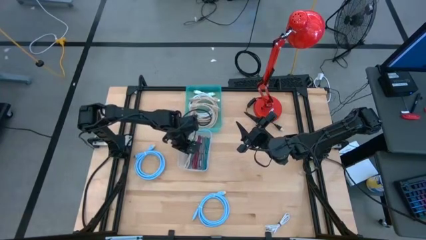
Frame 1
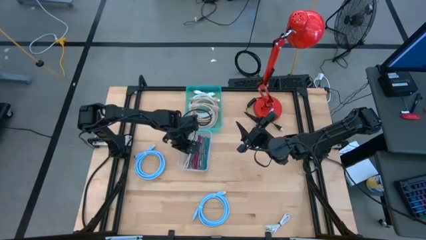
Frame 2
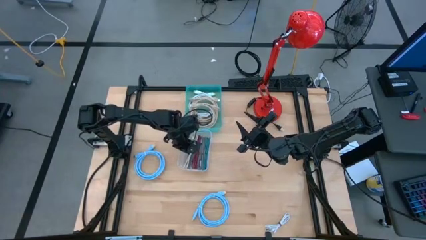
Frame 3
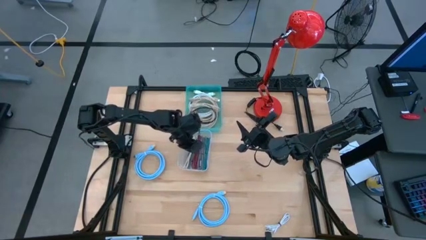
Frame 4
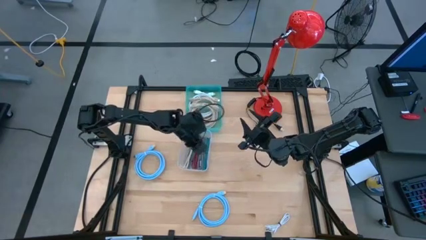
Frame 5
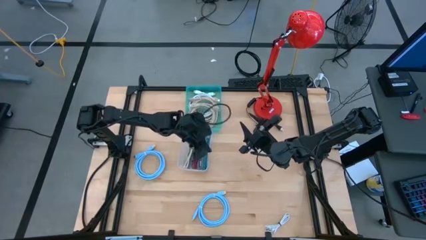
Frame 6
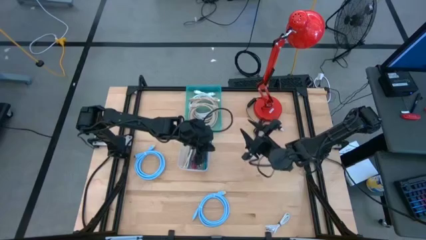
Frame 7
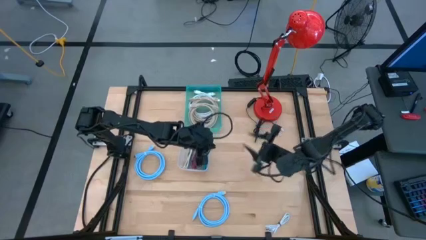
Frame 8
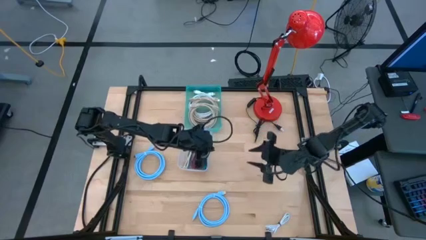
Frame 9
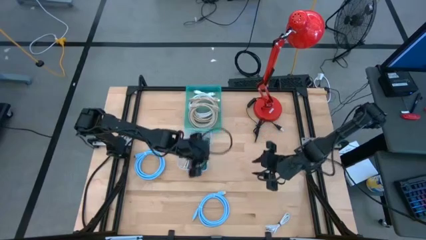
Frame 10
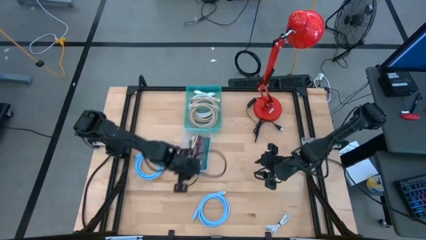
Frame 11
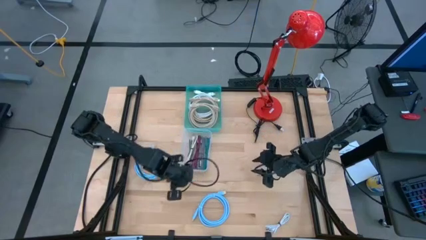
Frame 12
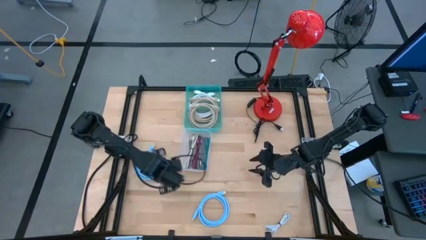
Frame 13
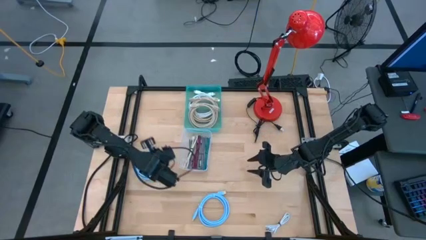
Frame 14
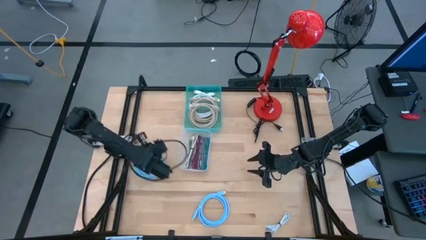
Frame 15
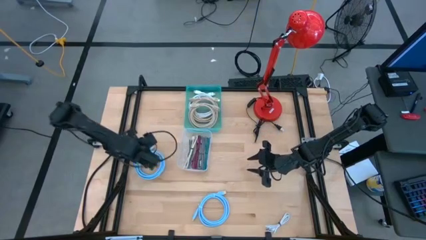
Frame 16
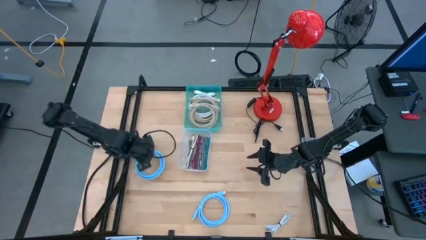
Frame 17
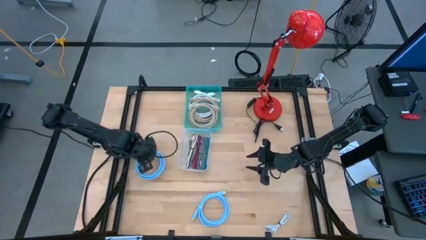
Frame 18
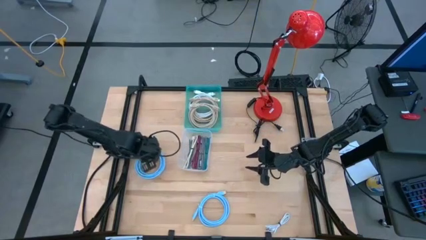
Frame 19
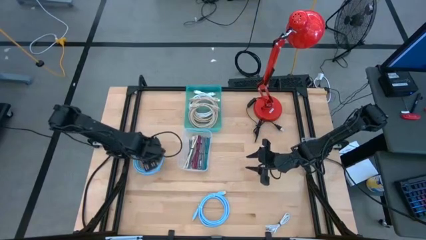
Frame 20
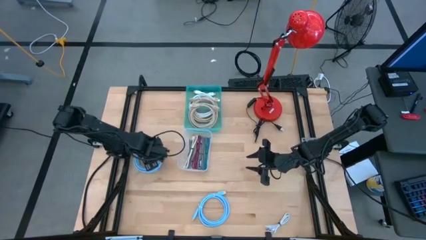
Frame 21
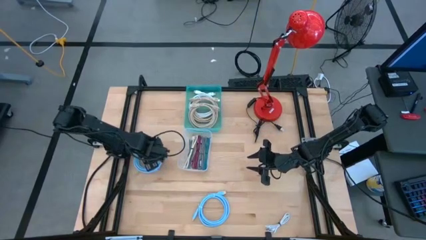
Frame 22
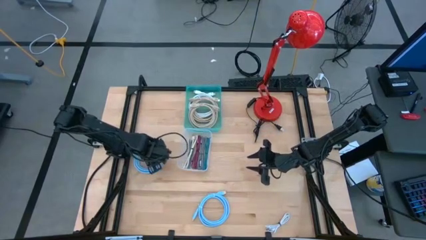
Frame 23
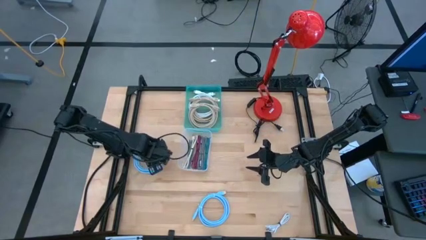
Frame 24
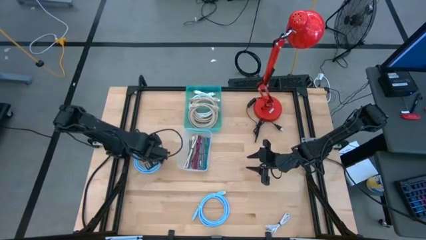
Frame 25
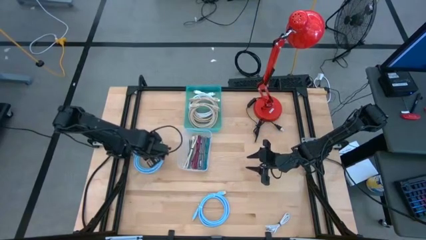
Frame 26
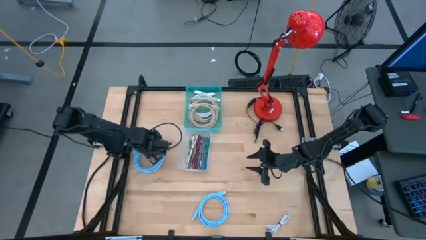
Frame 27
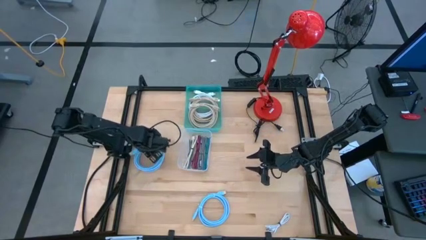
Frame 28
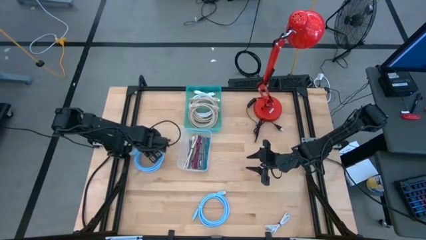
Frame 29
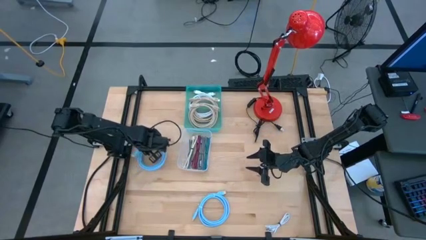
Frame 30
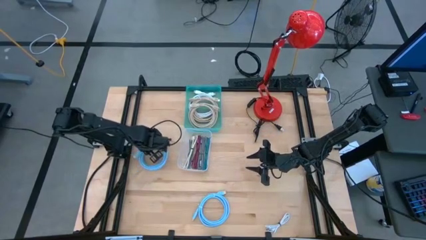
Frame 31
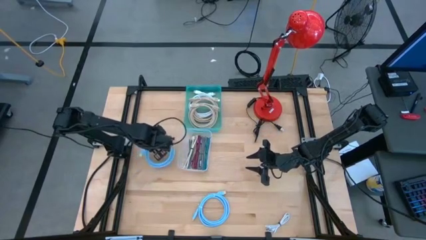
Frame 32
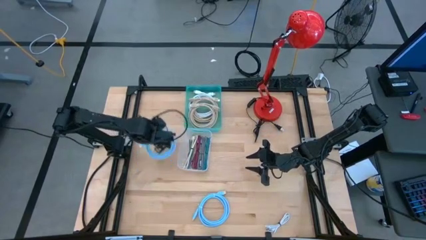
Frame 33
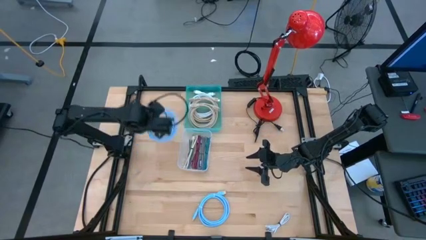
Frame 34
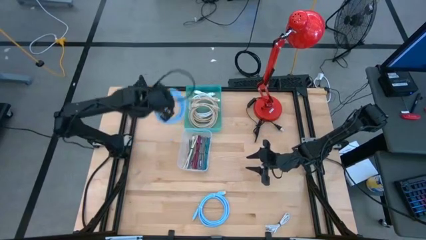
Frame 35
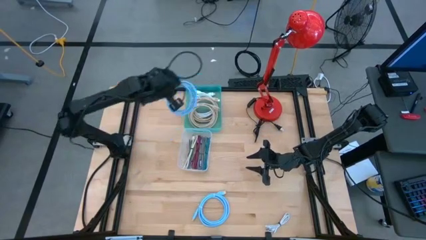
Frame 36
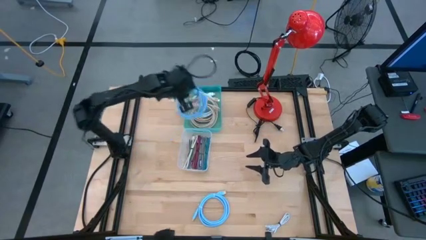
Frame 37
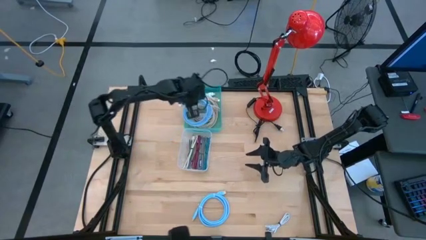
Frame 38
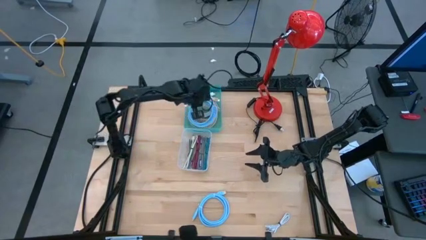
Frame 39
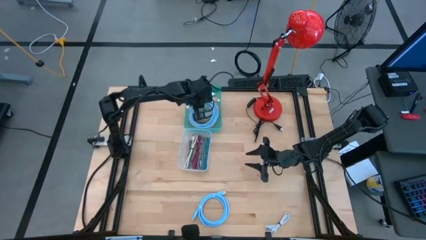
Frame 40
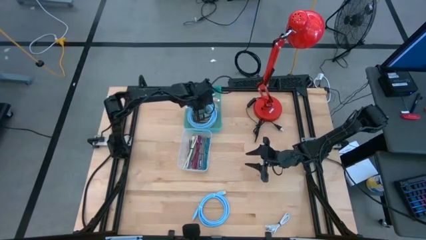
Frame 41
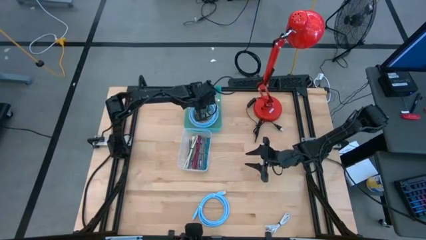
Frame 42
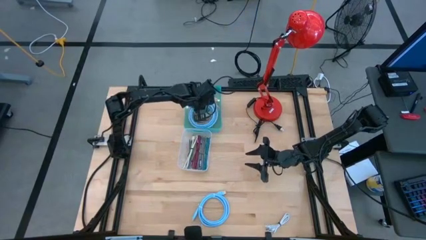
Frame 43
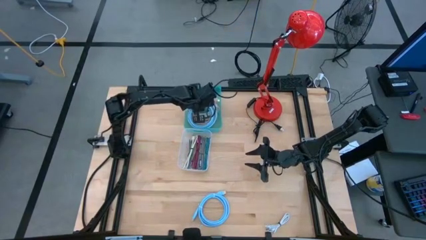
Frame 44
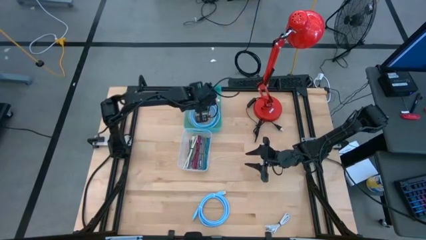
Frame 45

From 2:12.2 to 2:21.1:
Task: Pick & Place USB Port
Put the left blue rolled USB cable into the blue bin

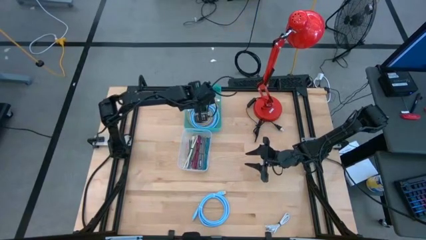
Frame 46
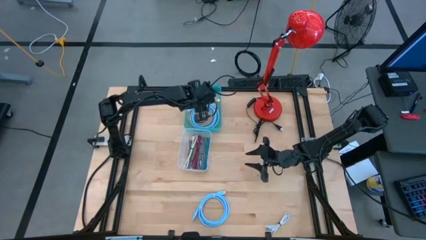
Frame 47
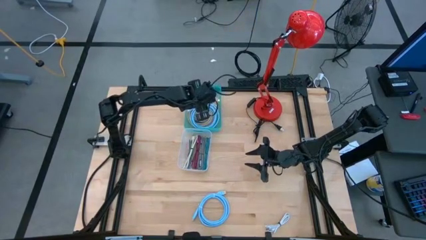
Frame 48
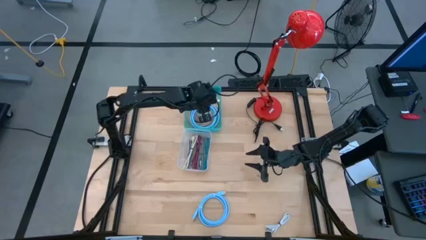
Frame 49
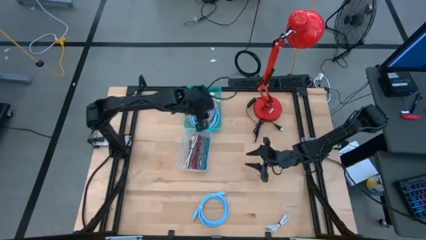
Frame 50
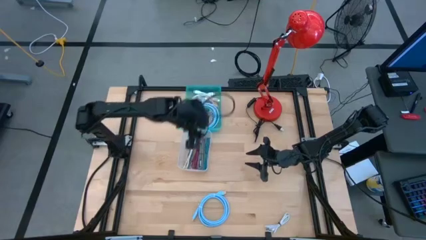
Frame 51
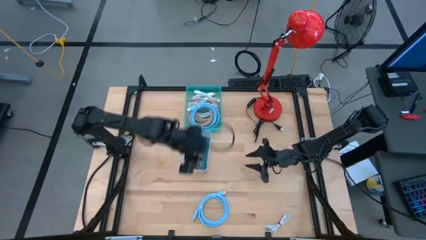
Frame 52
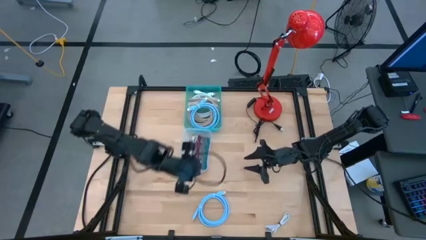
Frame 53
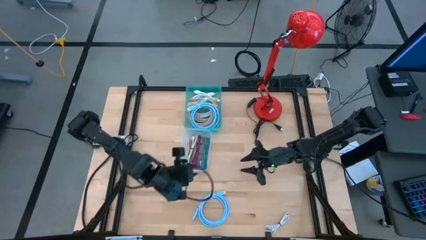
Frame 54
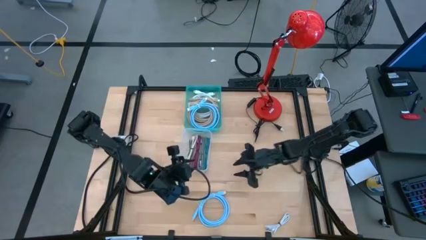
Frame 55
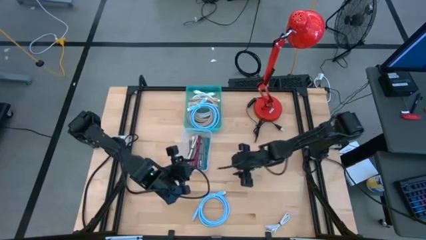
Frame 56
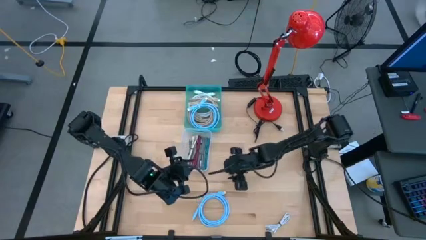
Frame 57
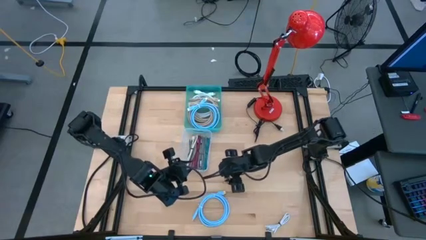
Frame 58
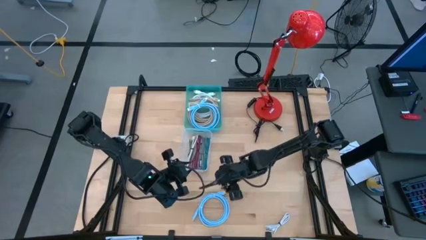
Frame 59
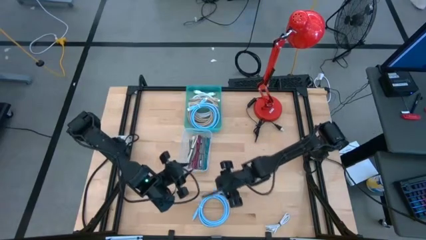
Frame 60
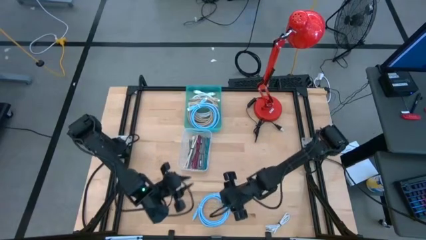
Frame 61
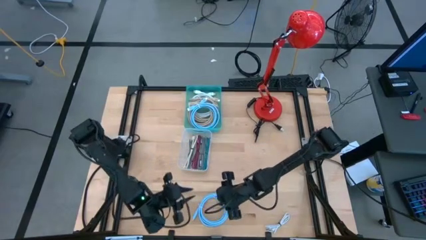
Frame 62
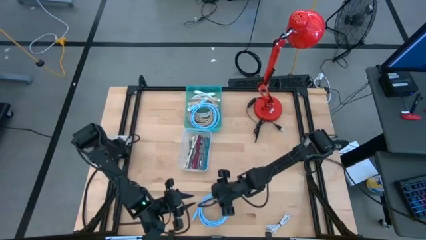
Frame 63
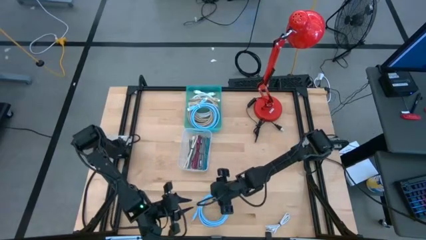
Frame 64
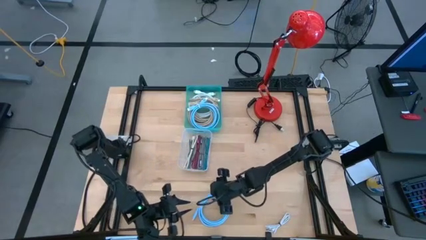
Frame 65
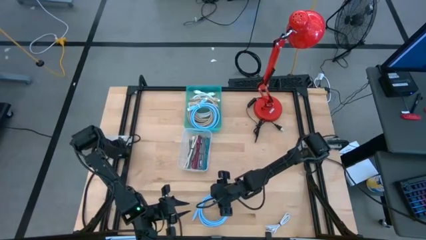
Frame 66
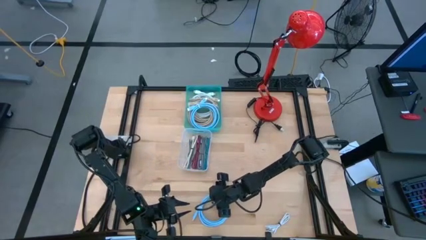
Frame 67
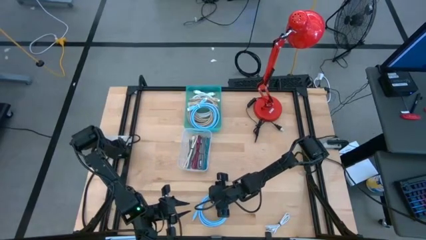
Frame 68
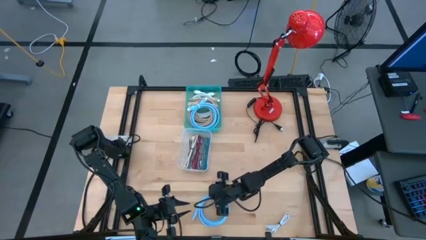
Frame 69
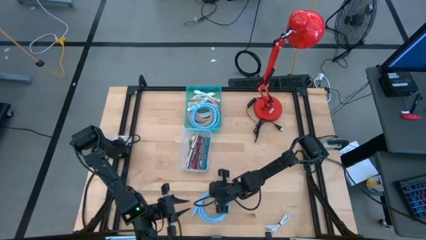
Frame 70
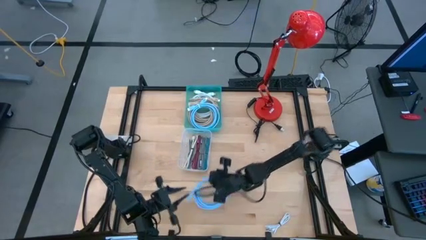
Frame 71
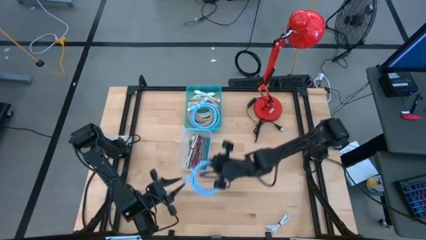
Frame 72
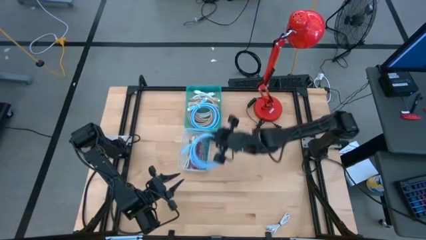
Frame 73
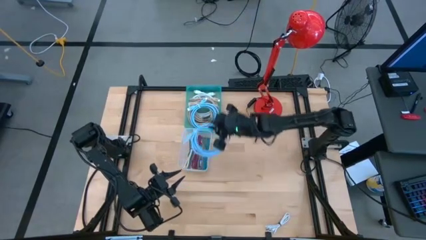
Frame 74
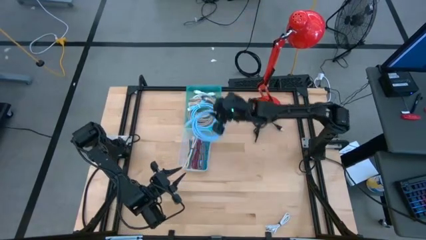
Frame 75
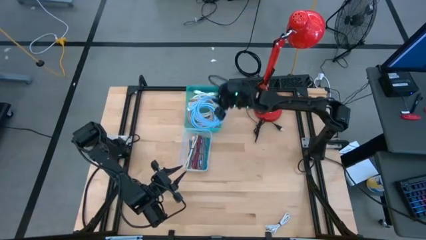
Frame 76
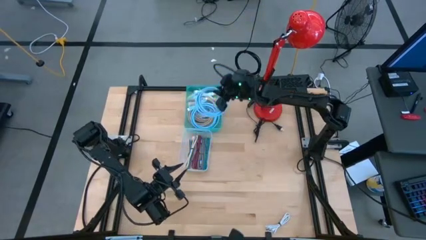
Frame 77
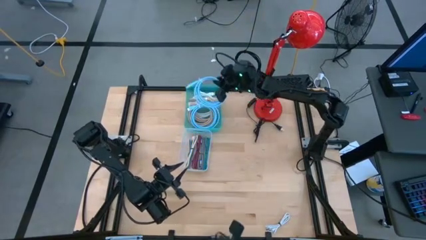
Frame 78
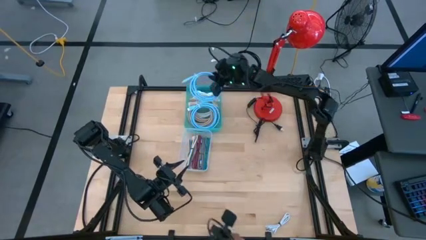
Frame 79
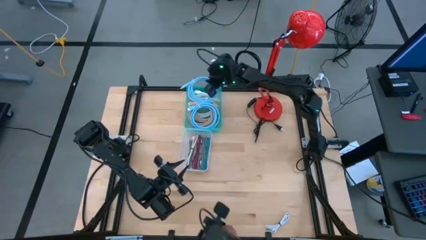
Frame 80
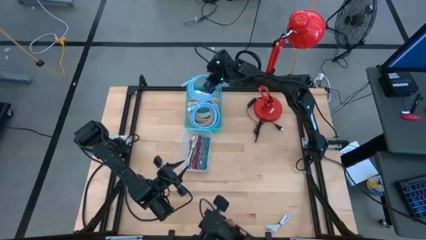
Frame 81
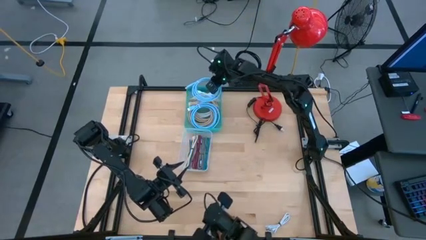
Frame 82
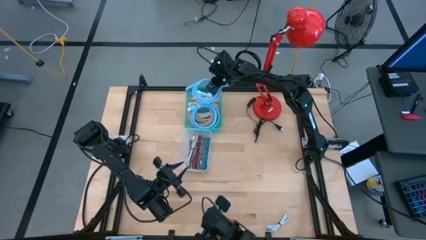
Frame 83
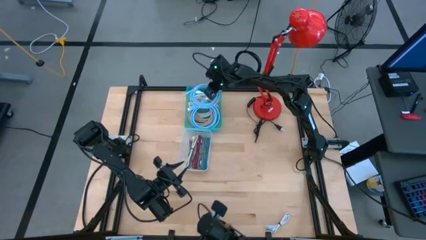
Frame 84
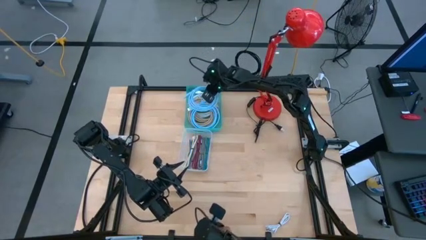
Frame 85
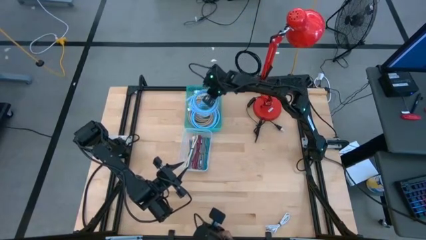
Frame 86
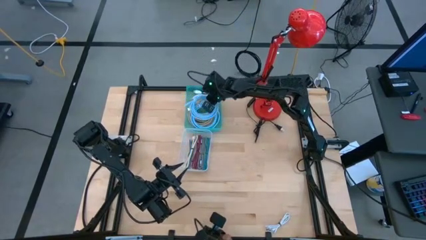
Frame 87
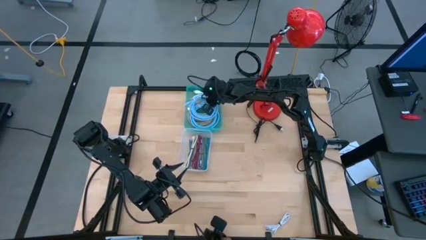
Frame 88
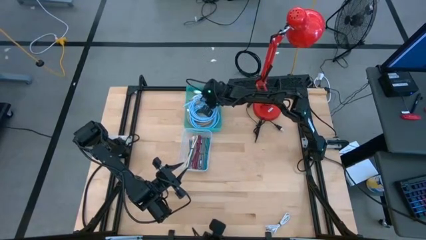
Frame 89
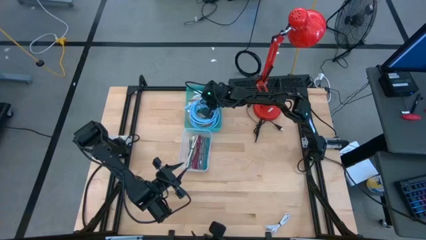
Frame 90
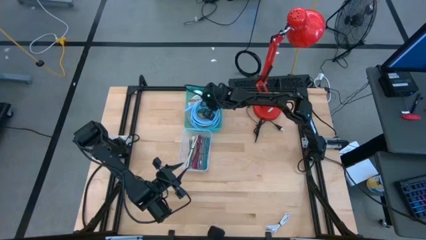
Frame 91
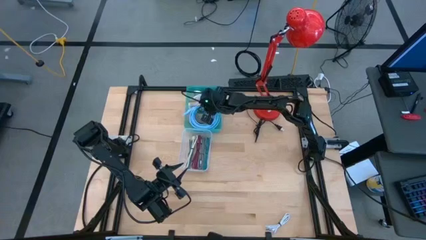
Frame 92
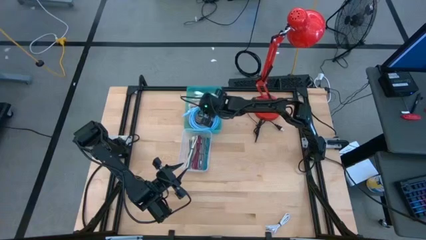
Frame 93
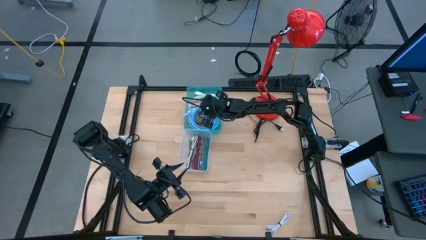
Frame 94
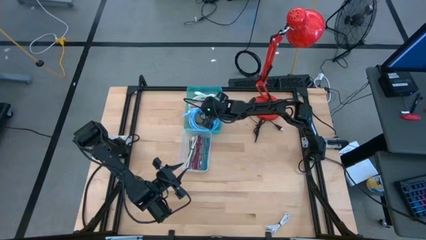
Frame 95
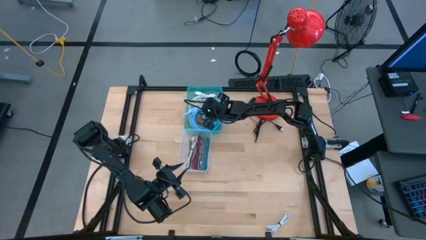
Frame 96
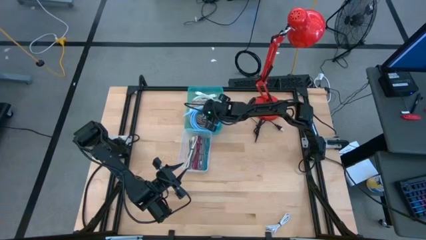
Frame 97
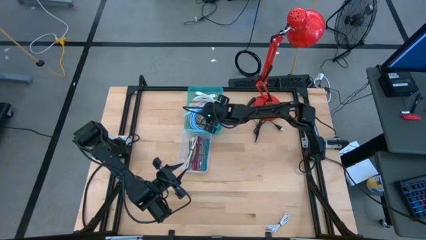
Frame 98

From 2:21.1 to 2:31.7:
Put the blue rolled USB cable into the blue bin
